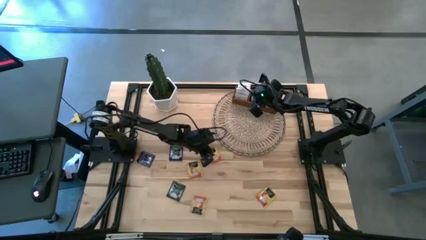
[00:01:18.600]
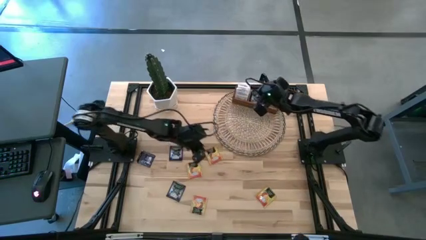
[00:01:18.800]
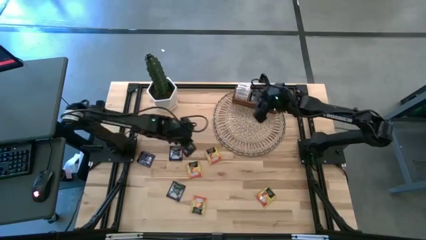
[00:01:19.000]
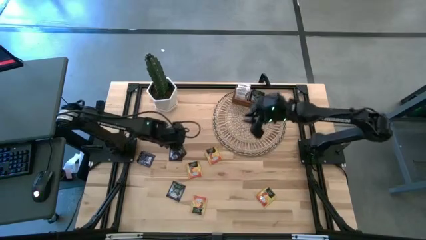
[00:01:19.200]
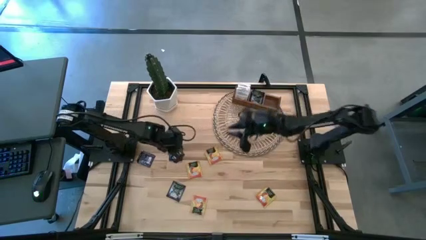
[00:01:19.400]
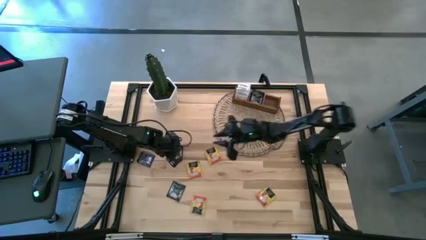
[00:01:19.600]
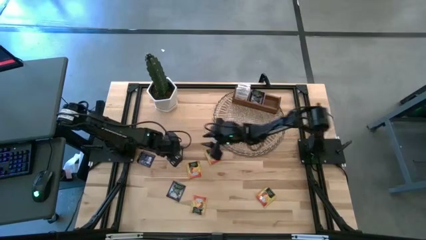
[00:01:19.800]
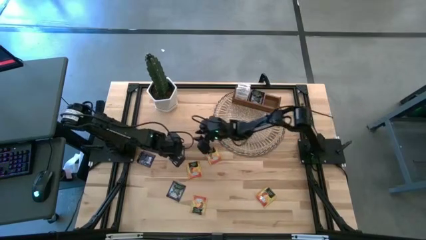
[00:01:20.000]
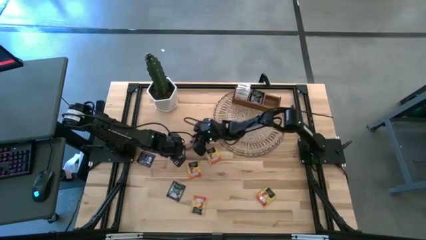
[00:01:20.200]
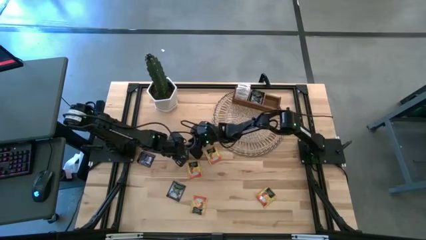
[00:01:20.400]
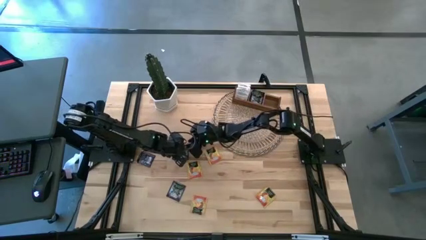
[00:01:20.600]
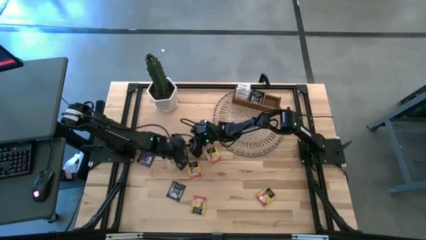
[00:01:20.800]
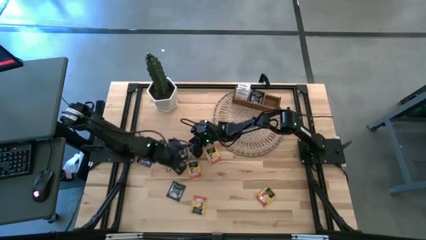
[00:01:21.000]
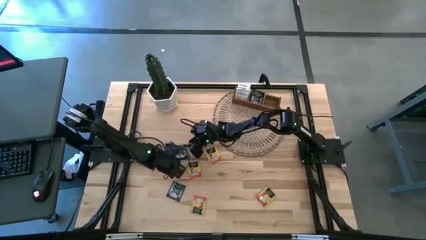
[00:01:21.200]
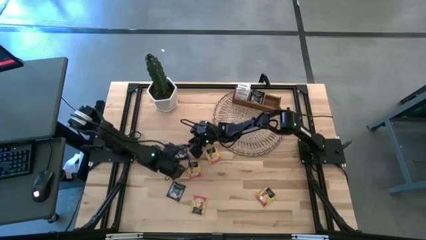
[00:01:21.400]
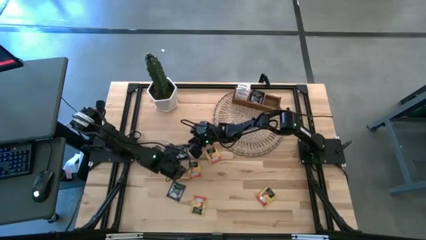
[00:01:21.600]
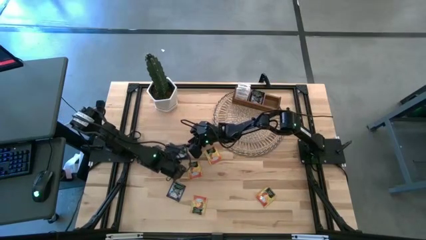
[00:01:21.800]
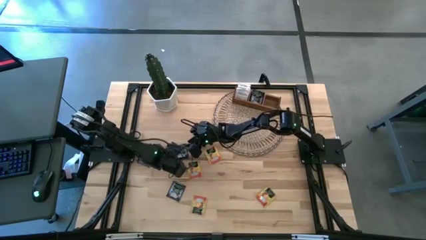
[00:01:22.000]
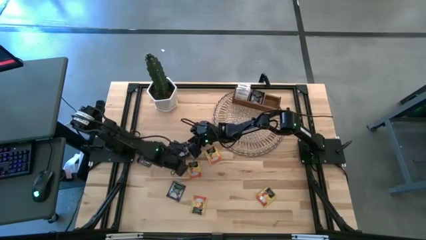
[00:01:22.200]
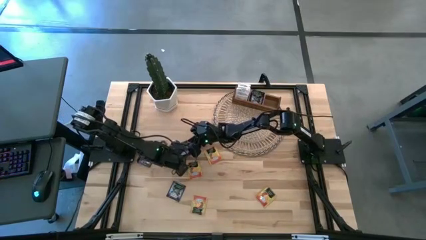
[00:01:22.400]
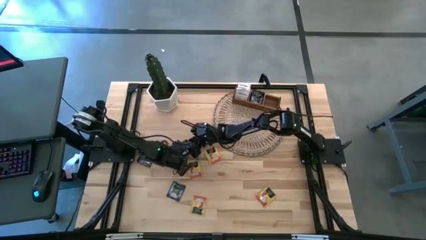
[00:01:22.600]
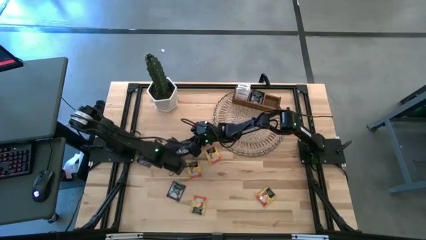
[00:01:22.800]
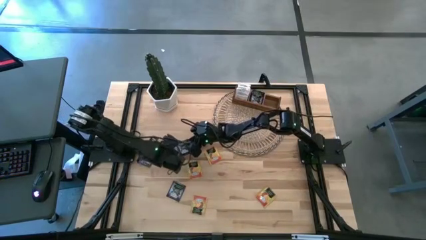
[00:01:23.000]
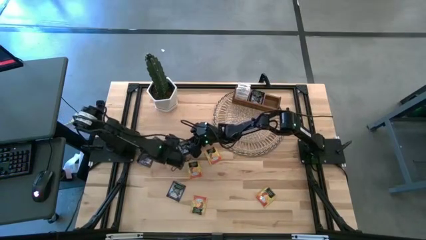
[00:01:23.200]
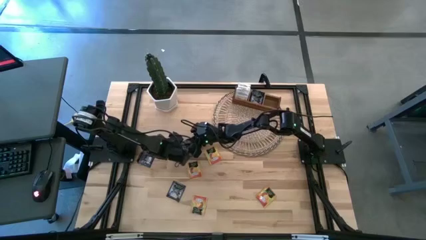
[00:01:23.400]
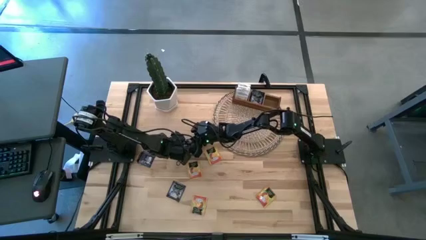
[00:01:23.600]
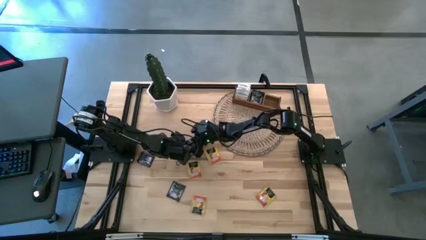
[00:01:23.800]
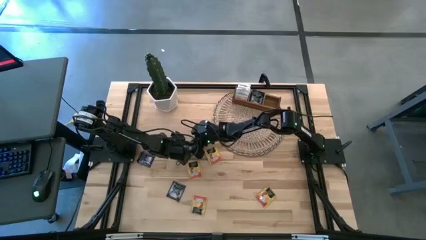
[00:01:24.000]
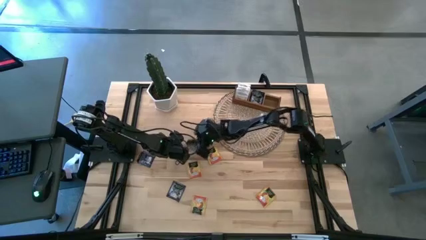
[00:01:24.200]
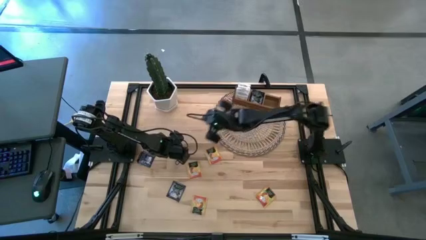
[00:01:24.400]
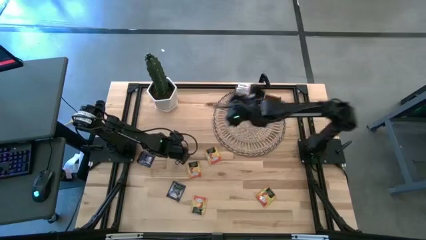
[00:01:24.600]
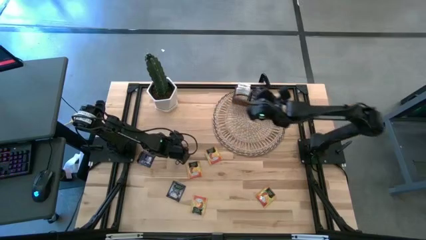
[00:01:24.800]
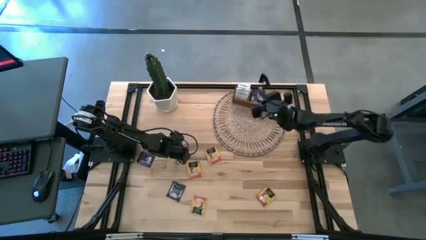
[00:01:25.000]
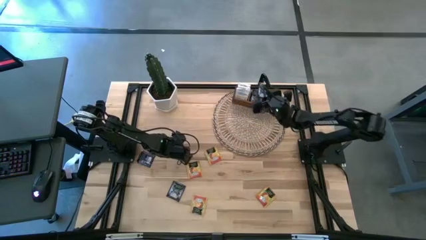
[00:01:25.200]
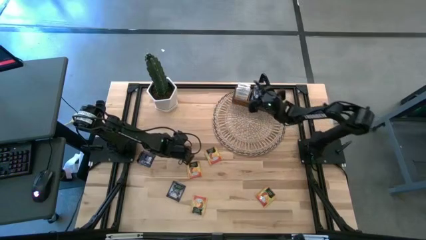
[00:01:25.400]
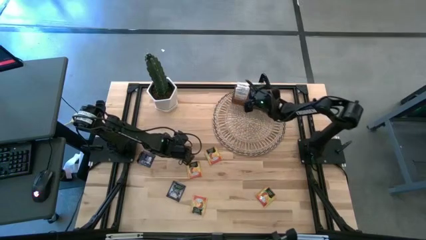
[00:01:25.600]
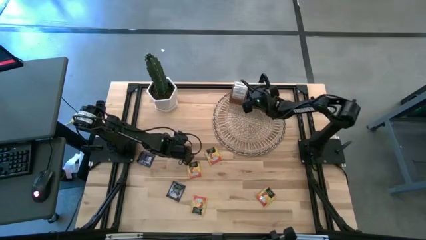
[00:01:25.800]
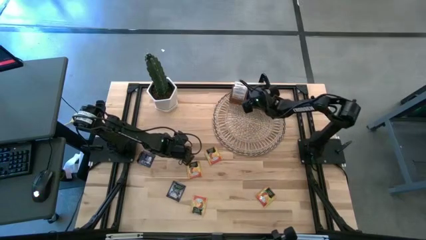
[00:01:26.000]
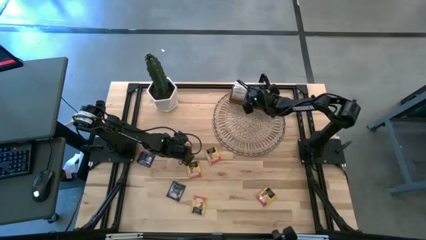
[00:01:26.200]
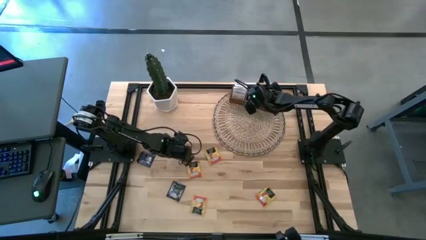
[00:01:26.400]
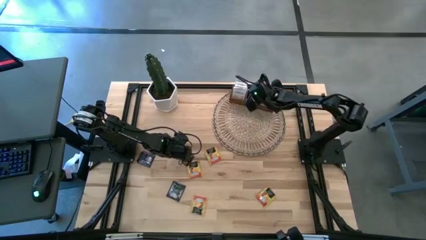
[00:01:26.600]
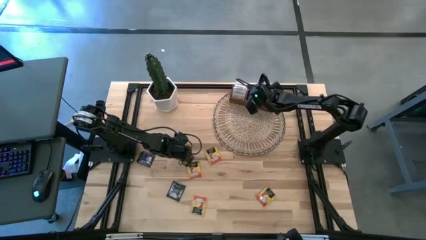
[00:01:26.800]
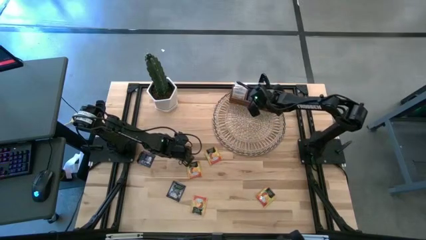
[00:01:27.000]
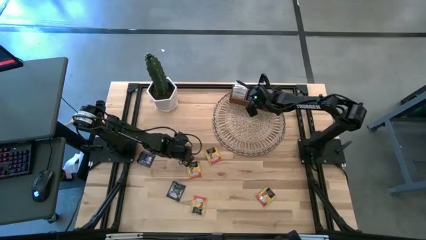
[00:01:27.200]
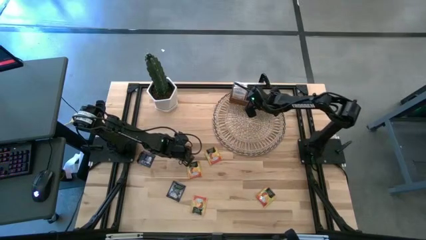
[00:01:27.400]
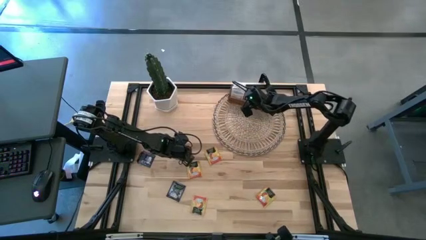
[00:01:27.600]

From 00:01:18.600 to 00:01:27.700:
Task: Pick & Place Tea
Put the blue tea bag into the middle section of the wooden organizer

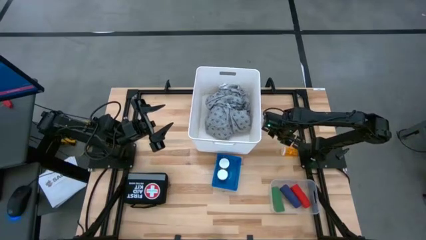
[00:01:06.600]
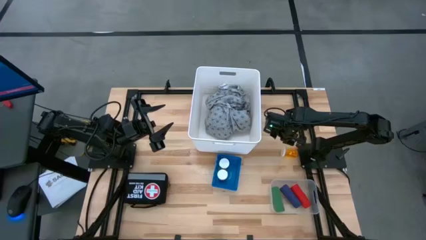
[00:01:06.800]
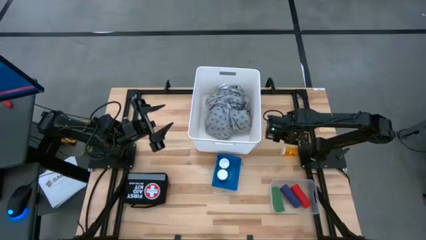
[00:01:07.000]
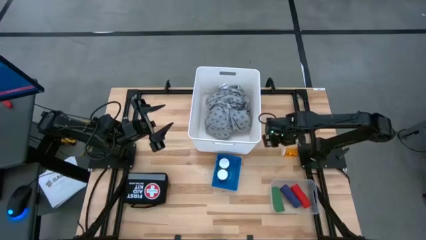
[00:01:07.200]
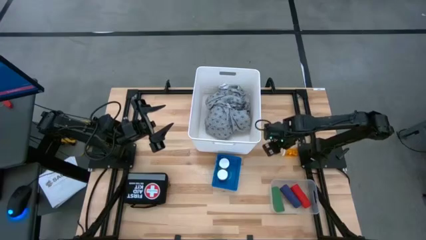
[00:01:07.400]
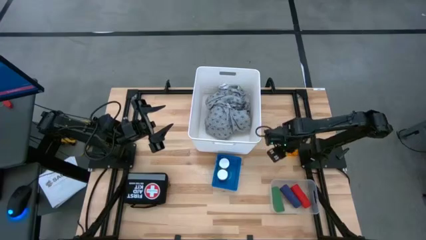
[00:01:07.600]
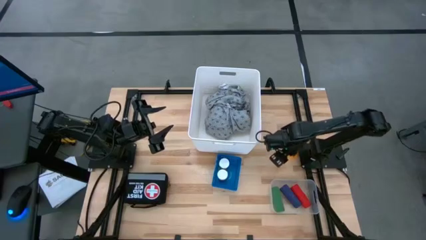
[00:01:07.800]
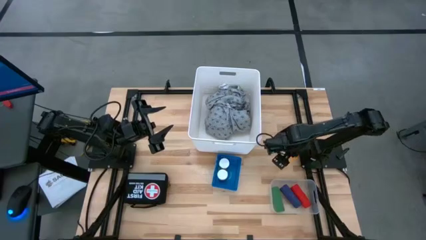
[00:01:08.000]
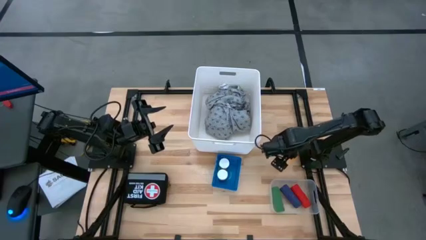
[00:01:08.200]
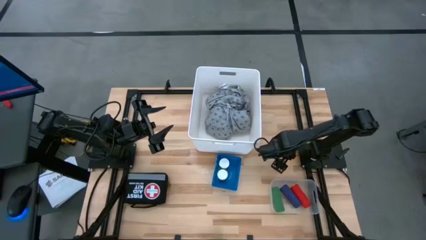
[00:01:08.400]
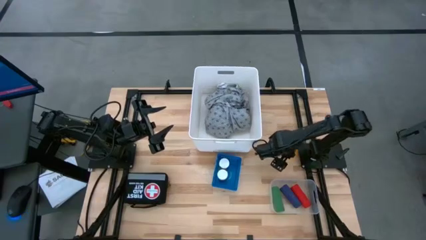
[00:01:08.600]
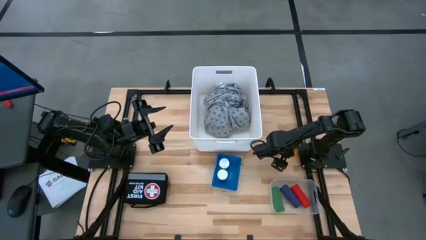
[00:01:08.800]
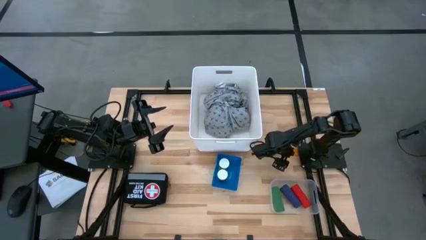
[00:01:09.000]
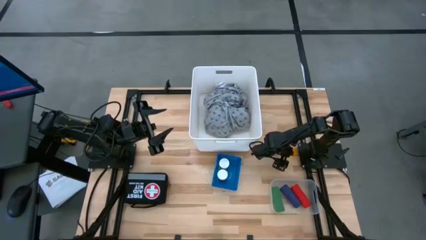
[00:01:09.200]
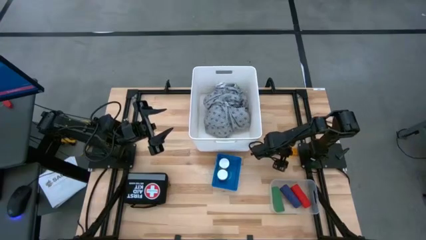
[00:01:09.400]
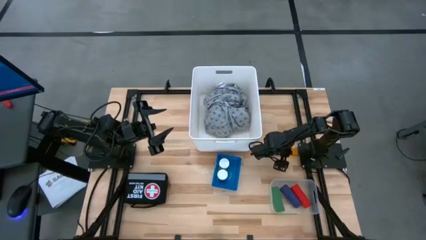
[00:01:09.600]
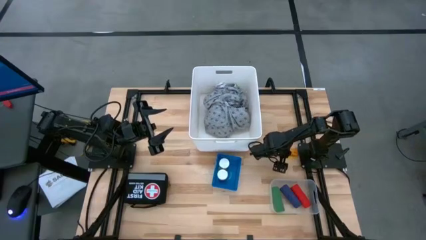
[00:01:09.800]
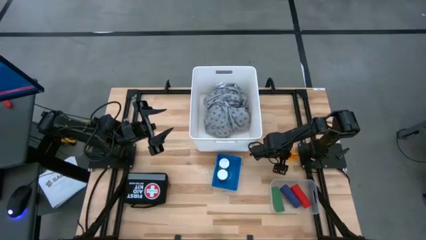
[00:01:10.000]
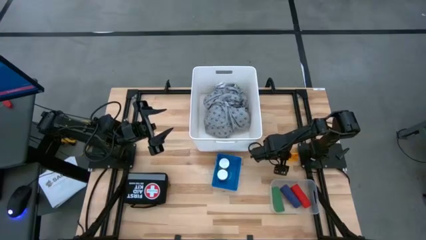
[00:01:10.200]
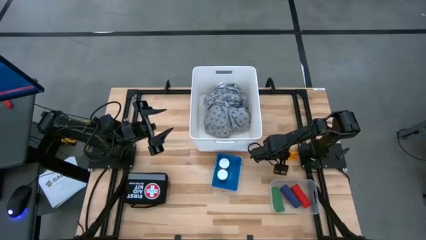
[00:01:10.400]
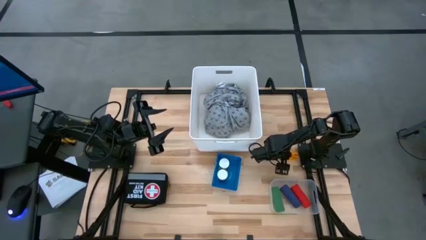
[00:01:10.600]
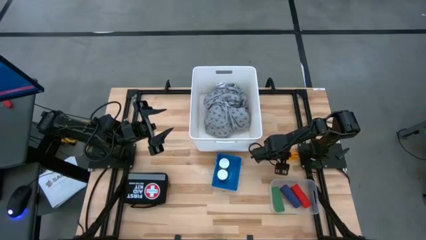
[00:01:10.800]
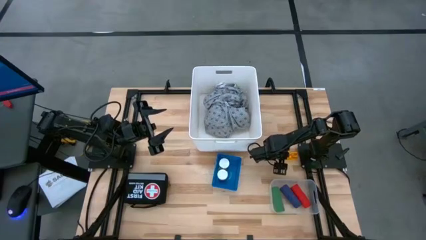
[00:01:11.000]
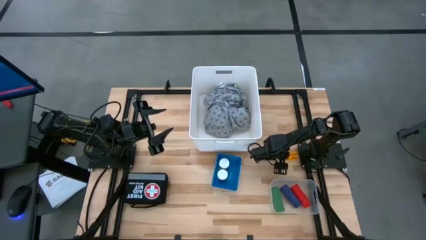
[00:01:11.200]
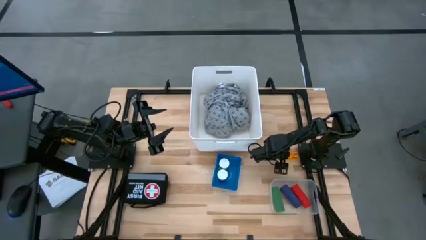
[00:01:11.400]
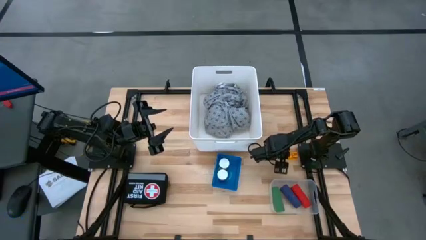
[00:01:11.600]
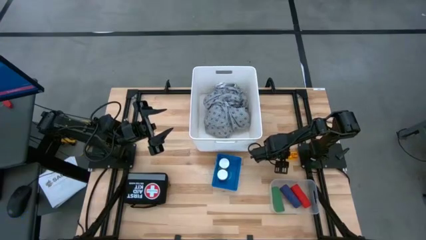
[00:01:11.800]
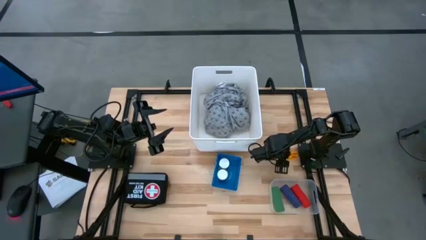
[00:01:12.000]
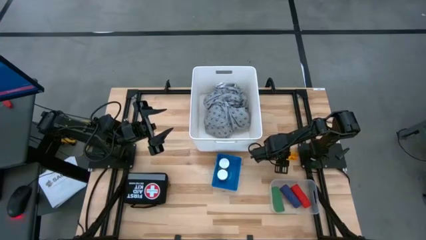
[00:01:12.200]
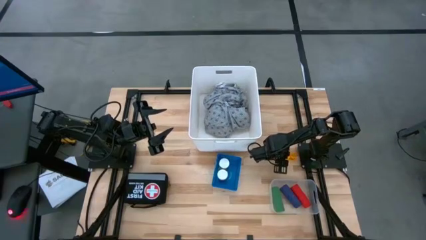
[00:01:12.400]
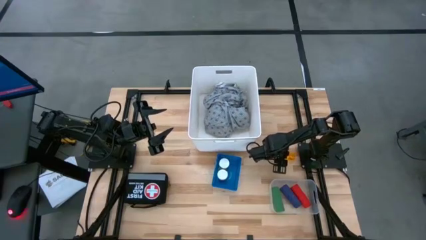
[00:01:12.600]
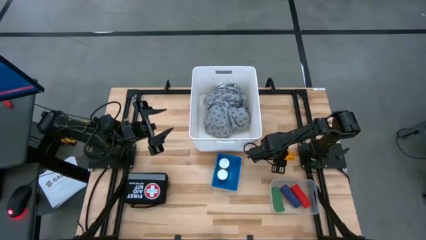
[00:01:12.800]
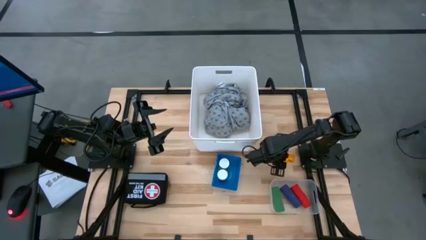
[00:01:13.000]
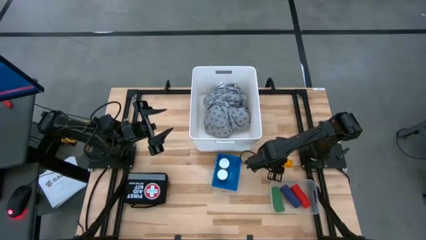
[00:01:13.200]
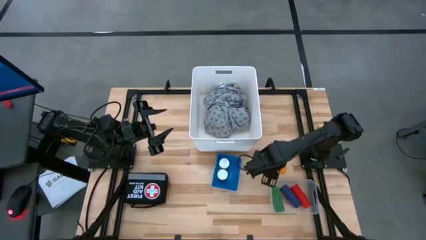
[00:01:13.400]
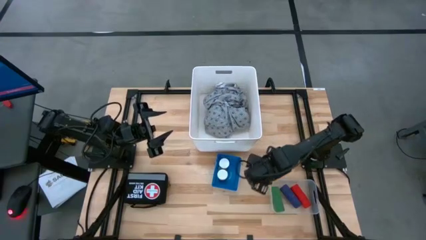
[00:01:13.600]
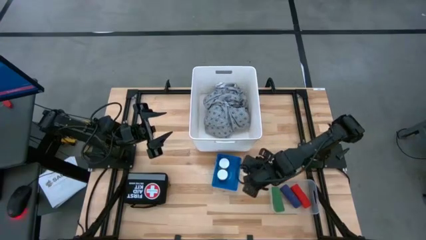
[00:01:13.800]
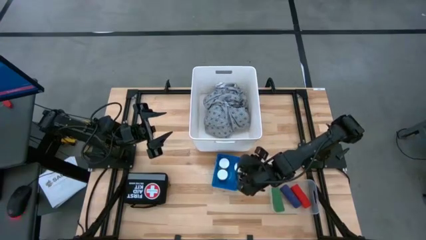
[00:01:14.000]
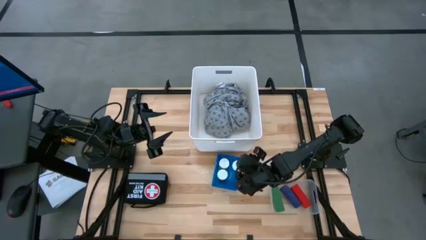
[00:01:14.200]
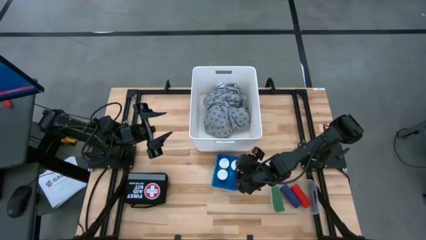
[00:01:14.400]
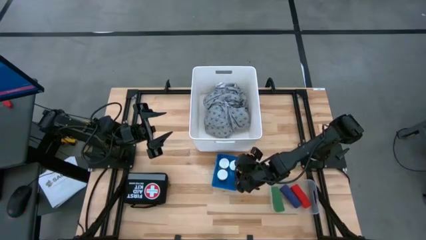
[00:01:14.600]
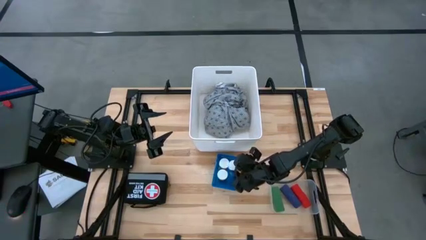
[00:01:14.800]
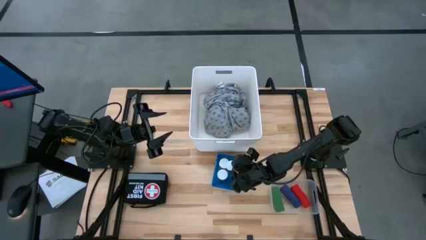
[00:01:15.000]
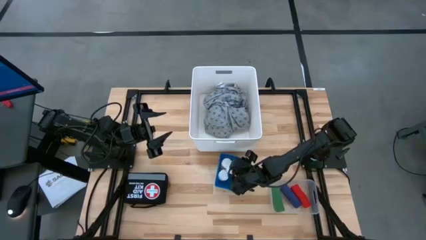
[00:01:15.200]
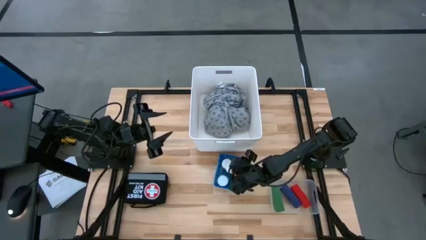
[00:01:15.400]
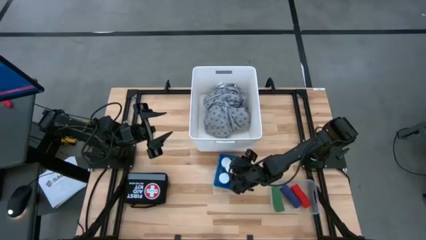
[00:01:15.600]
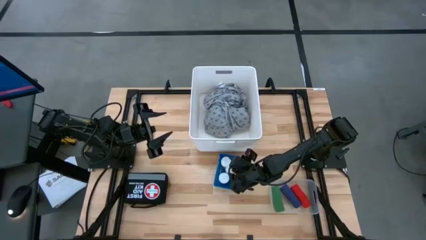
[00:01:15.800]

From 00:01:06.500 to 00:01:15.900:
Task: Pick & place medical supplies in basket/bin
Put the yellow pill bottle into the blue bin
